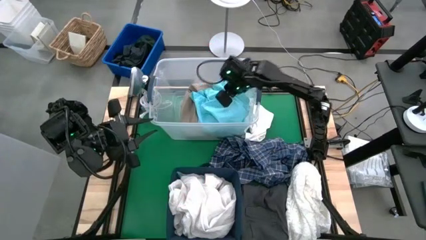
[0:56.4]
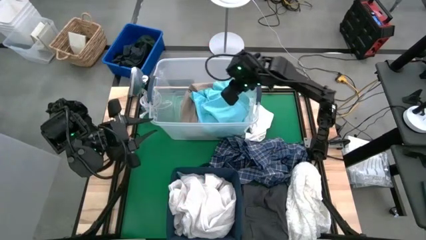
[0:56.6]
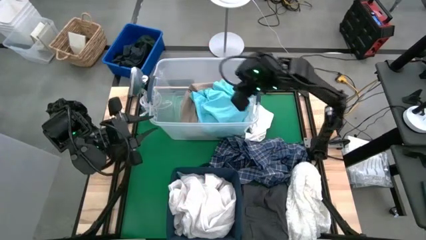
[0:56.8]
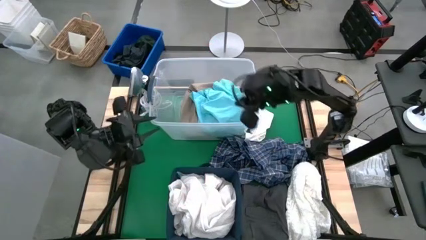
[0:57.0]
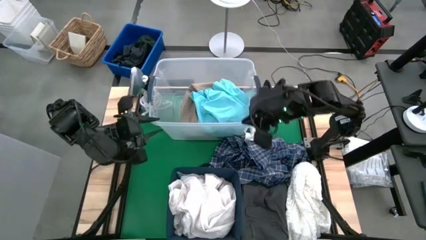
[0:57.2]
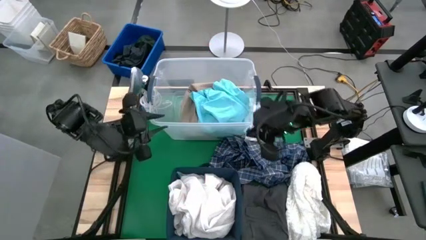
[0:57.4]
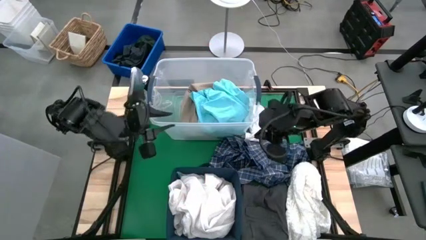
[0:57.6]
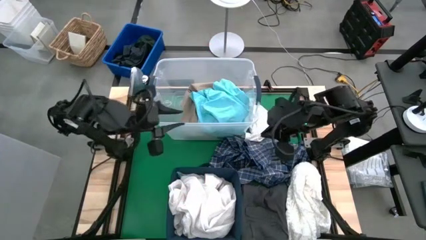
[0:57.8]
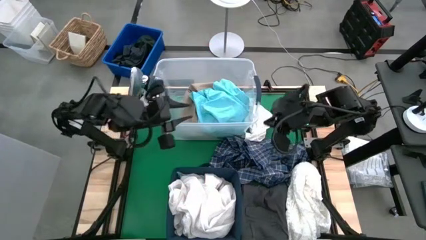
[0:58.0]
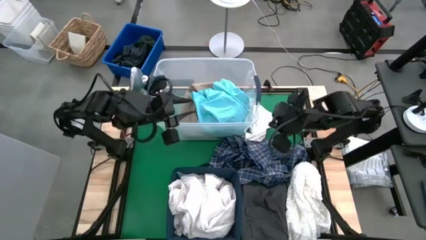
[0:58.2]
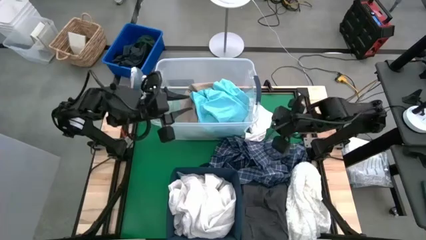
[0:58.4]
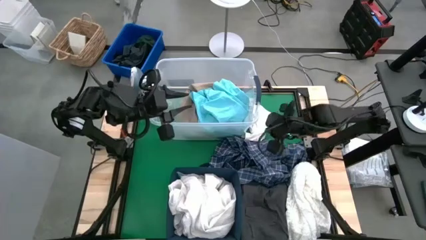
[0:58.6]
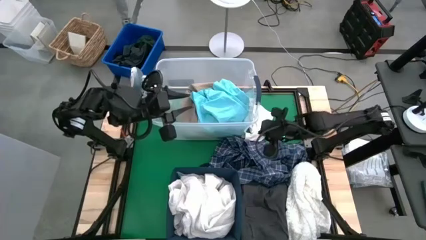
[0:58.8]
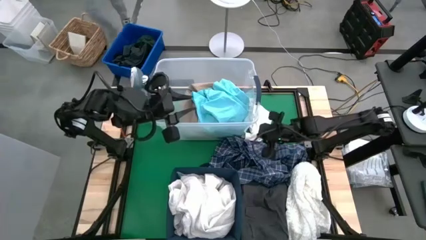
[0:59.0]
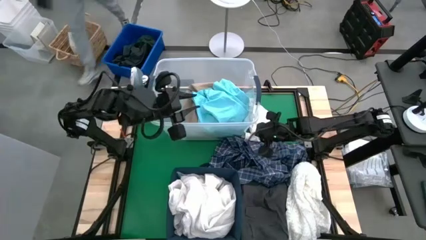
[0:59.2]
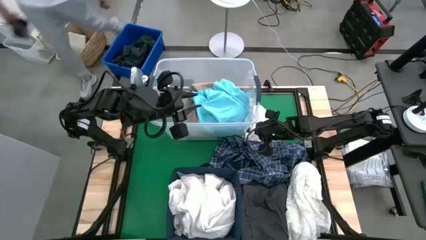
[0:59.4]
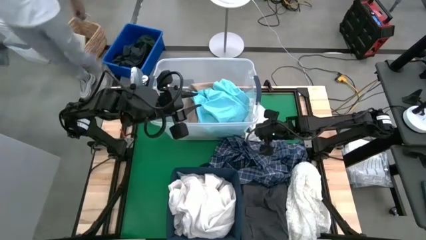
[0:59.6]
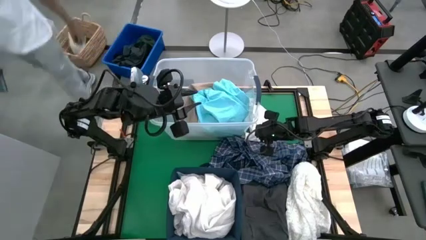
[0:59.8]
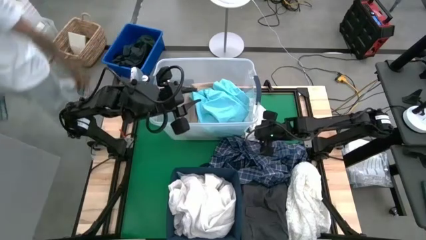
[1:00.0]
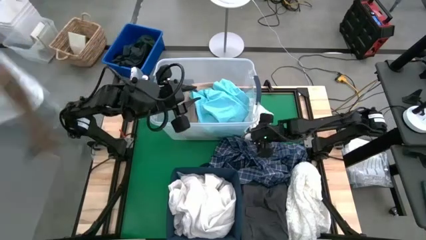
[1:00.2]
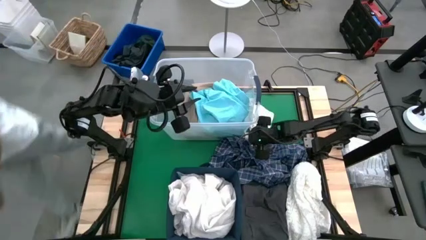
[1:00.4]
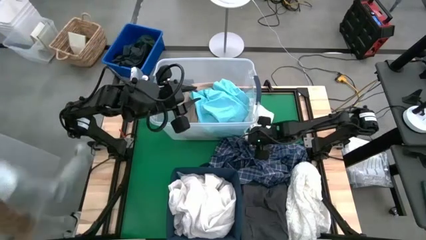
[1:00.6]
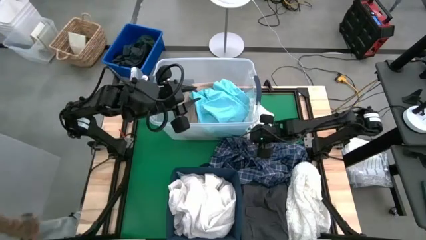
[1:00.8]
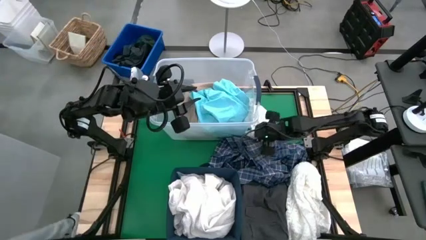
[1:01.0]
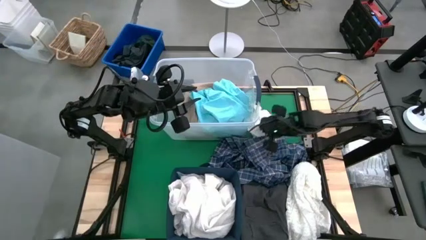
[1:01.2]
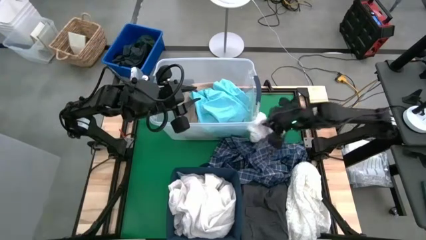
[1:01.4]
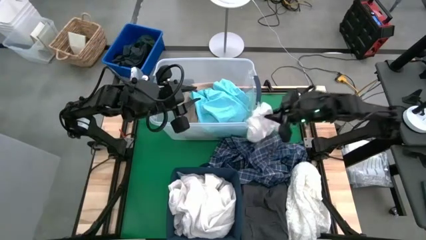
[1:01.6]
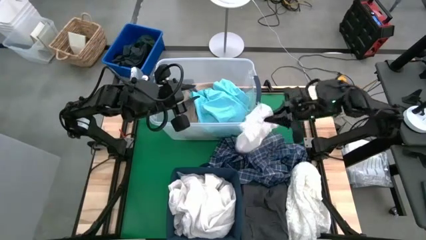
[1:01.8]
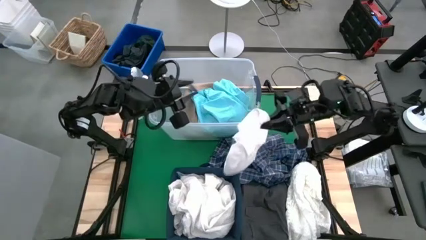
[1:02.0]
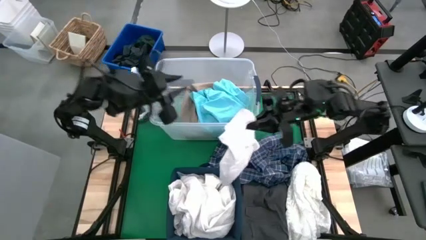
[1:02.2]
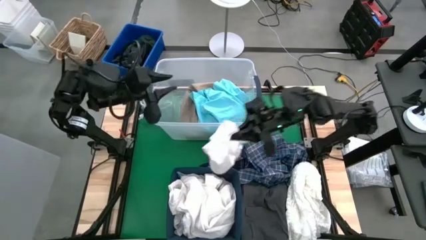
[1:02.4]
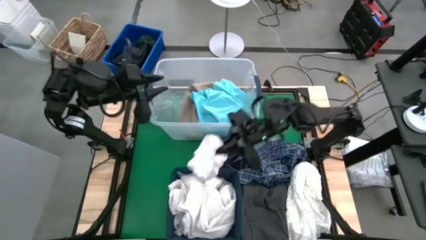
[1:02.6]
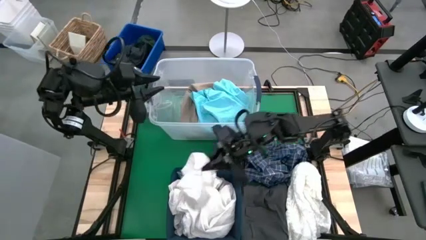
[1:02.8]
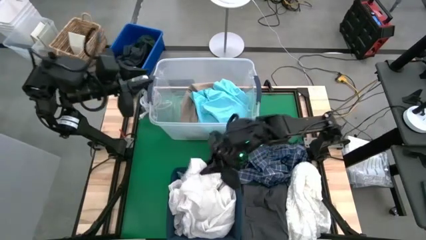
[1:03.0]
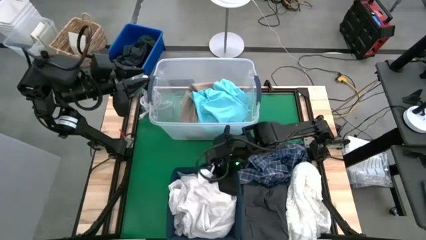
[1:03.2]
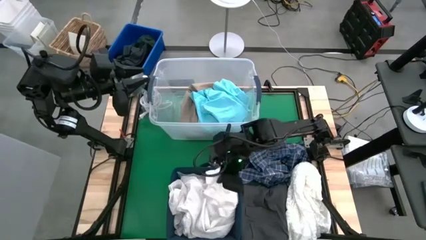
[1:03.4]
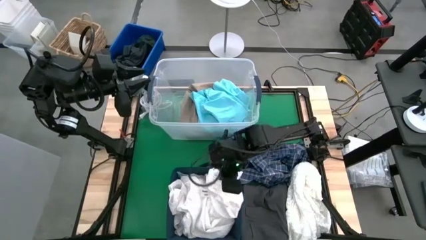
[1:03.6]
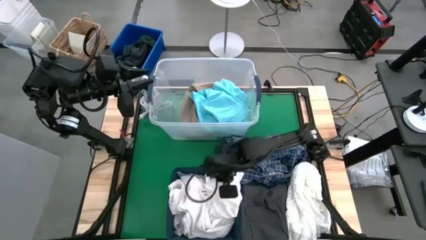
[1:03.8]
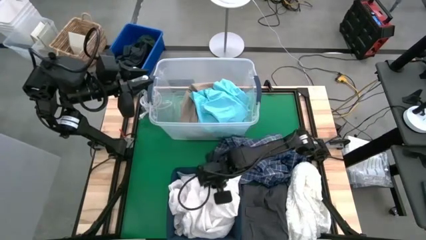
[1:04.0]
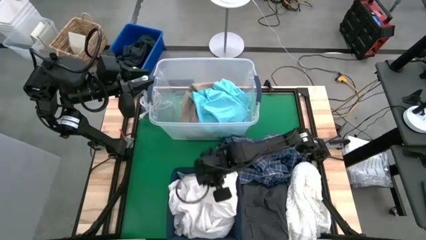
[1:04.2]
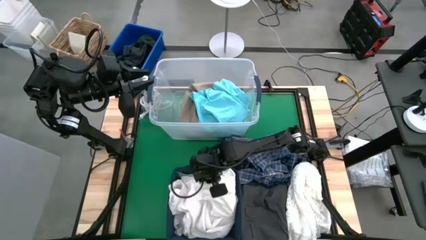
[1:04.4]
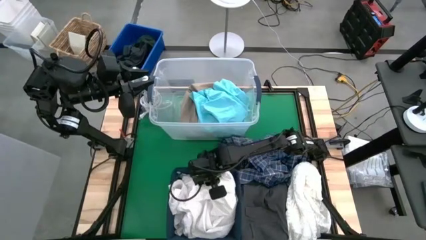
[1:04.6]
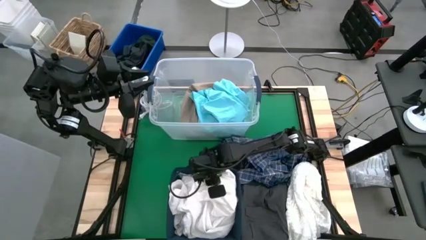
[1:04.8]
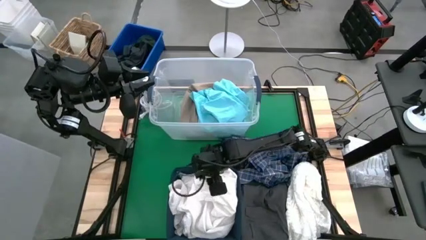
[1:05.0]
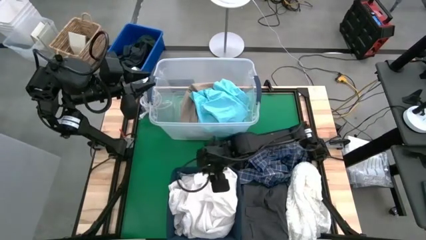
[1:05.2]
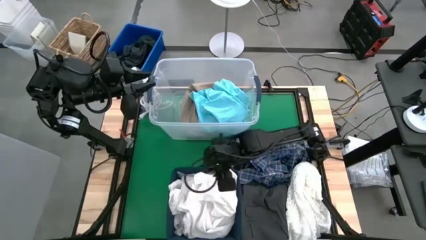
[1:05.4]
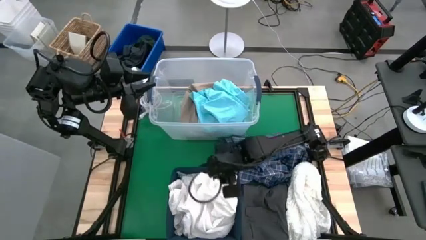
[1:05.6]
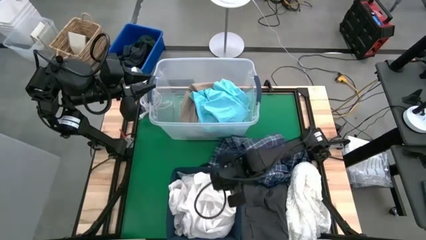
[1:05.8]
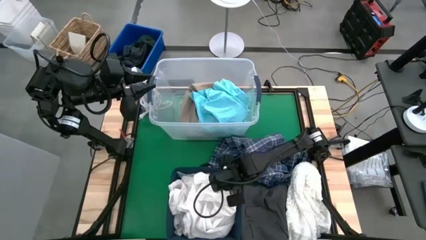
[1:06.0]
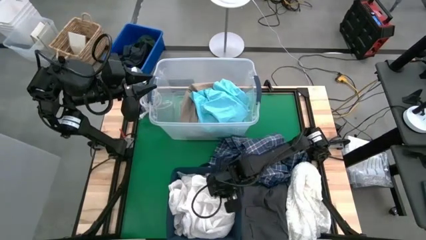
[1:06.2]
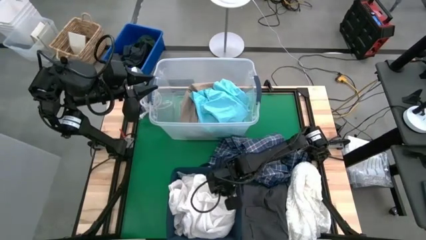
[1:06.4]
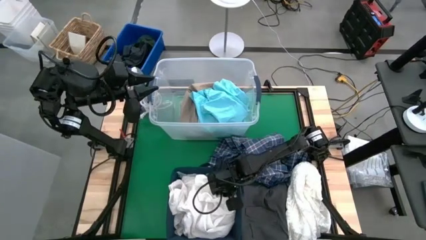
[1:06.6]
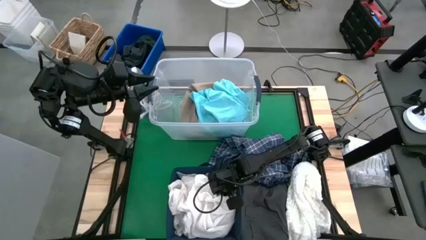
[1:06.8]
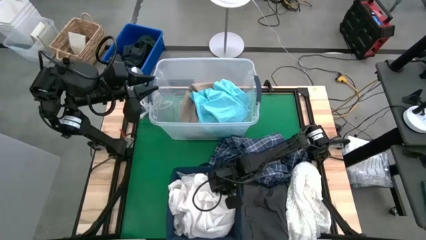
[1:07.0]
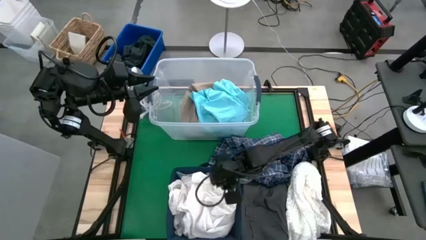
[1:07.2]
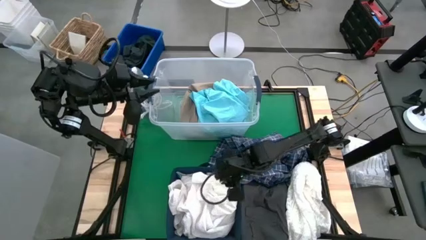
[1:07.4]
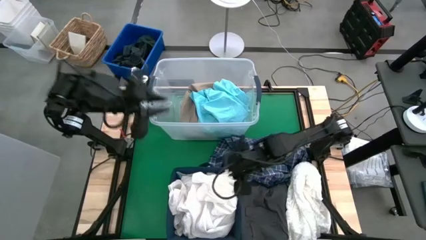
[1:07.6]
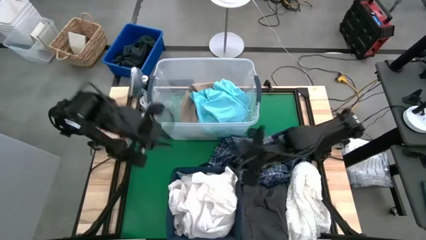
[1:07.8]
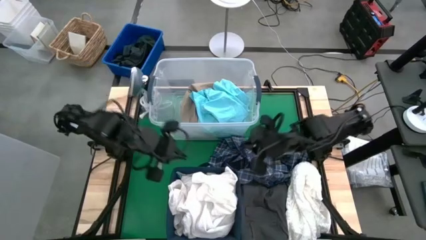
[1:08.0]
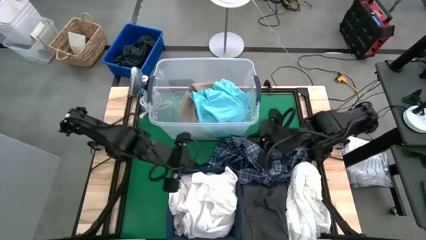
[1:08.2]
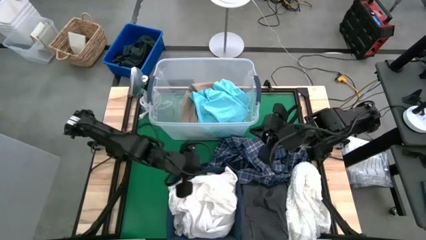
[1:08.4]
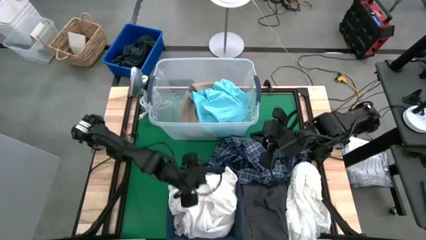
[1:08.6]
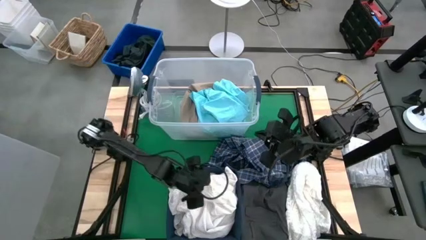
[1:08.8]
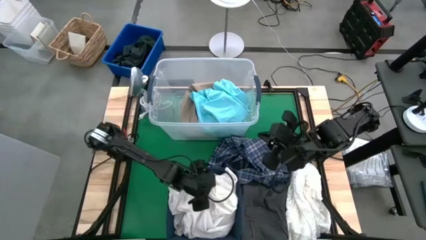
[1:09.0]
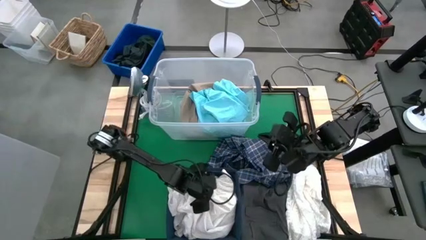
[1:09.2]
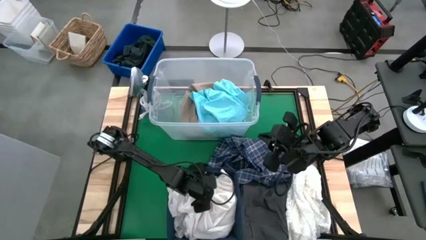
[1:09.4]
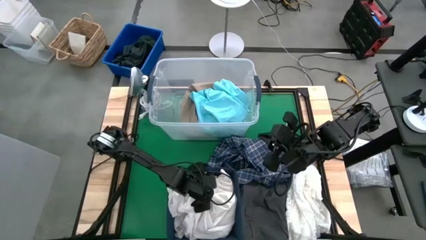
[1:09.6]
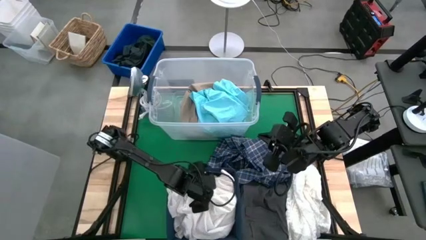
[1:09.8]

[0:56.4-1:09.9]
Task: Sort clothes
Put the white underwear into the blue laundry bin

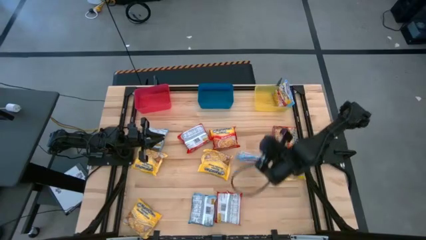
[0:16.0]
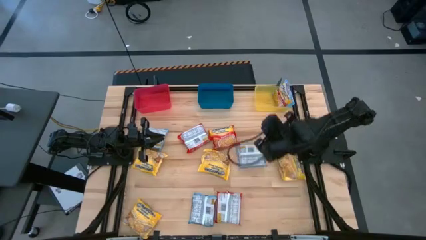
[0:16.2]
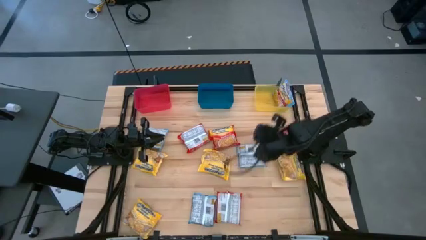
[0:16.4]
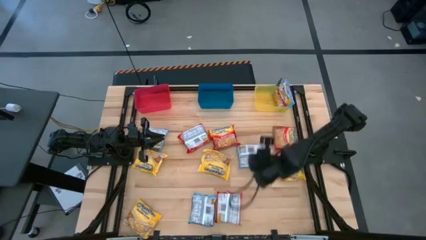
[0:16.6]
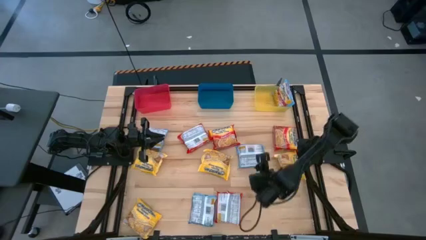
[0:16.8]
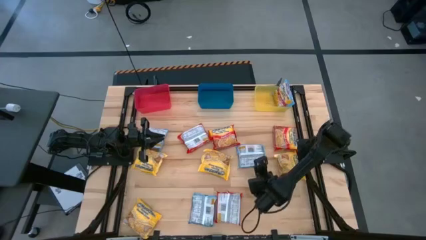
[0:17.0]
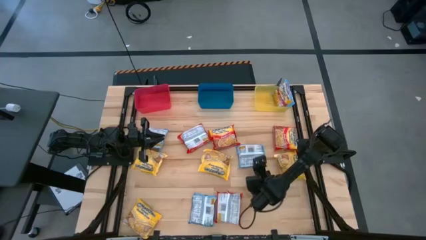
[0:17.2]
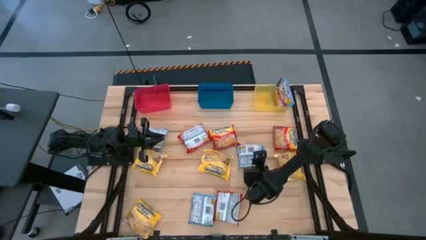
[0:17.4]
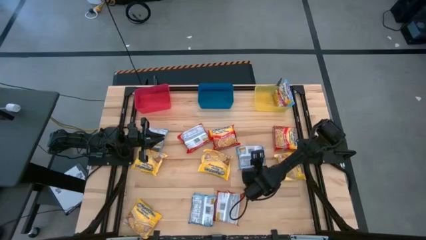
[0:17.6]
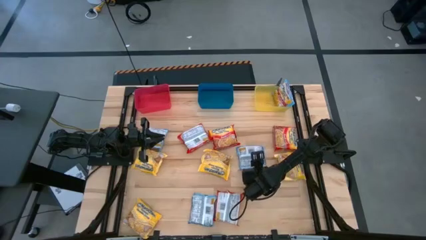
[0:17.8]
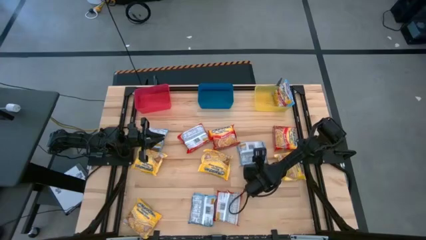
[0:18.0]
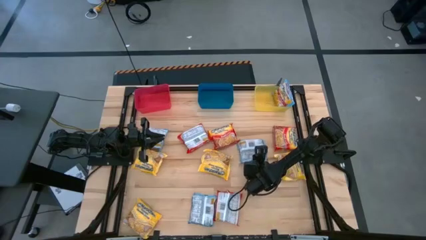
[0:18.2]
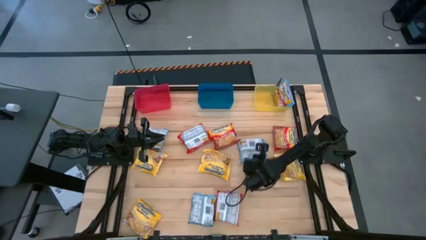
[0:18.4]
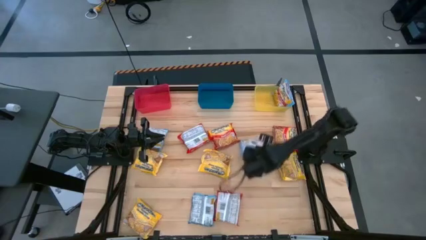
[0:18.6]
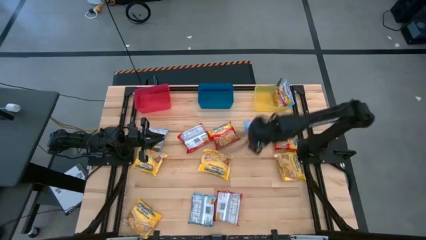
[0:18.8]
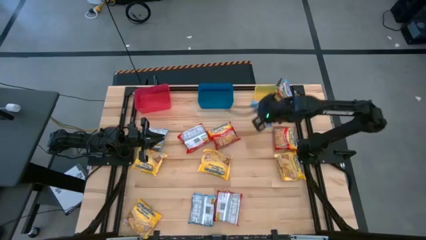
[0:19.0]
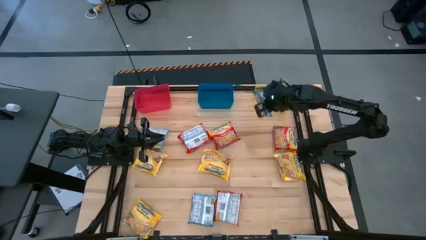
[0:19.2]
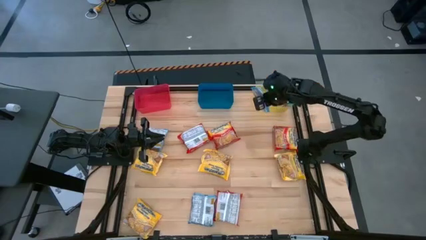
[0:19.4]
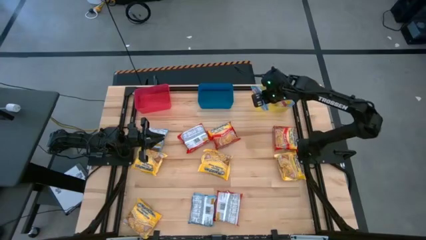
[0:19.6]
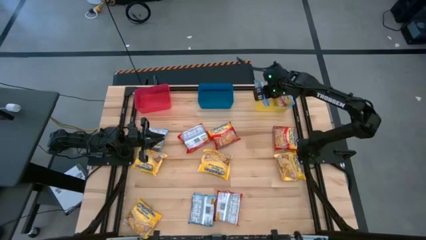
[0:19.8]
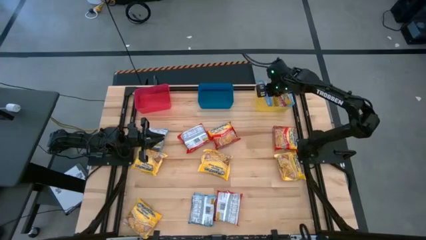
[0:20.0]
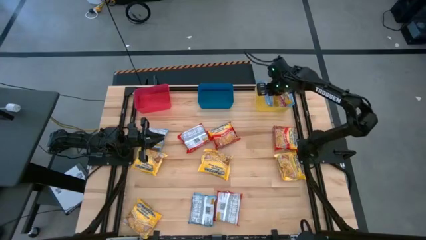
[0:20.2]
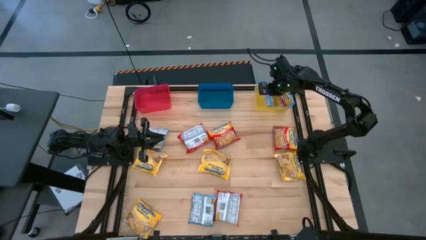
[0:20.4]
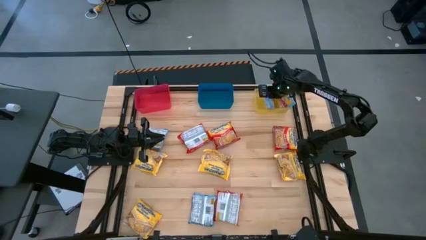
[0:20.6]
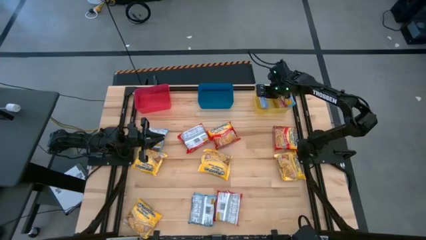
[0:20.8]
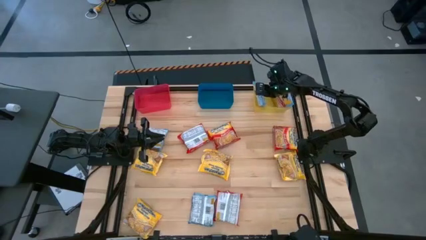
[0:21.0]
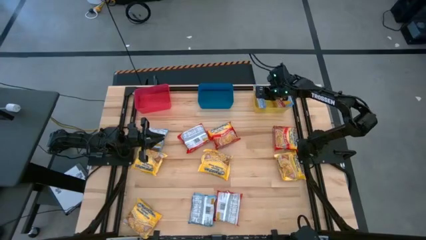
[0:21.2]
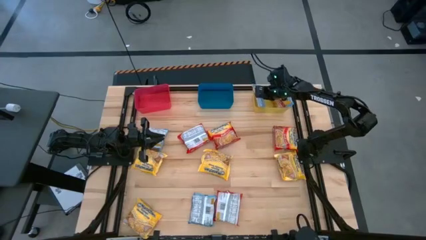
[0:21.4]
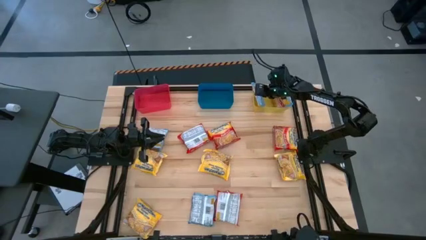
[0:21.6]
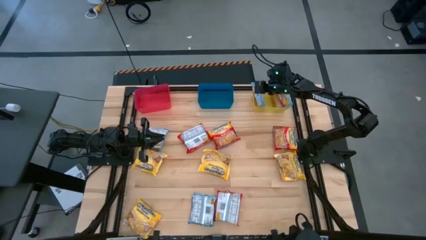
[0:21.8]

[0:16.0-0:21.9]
Task: Sort Maruchan noodles
Put the blue noodle pack into the yellow bin
